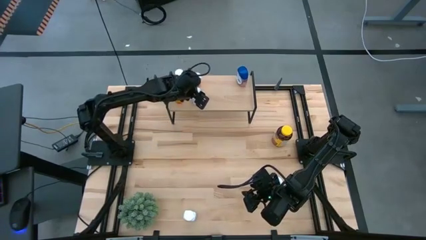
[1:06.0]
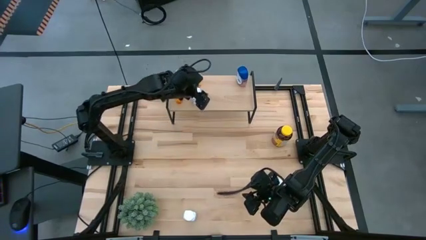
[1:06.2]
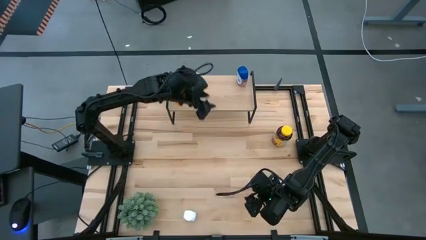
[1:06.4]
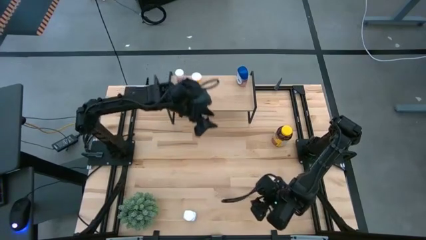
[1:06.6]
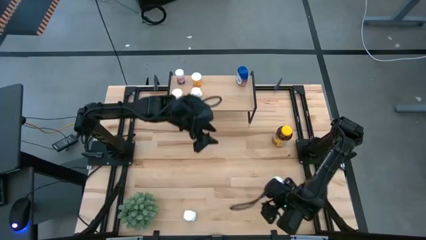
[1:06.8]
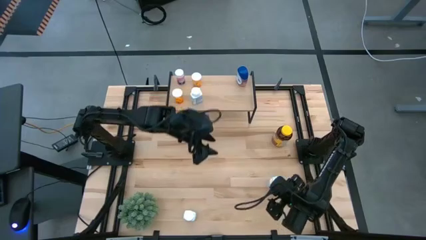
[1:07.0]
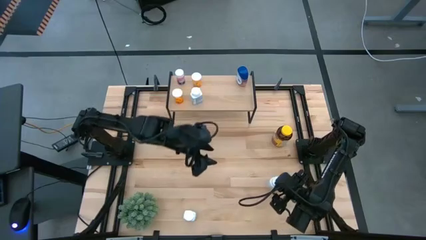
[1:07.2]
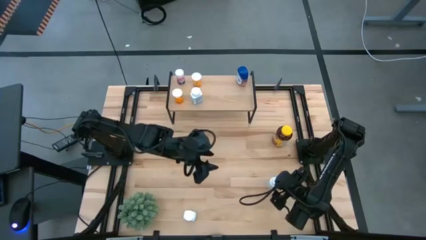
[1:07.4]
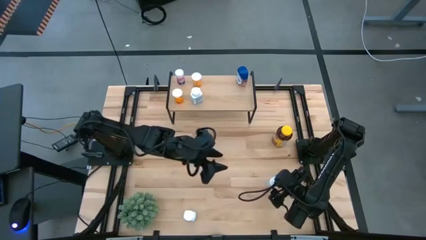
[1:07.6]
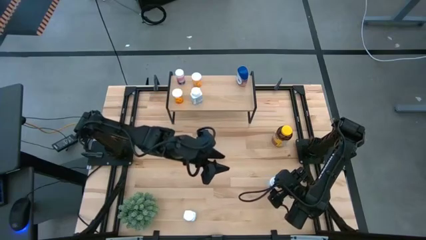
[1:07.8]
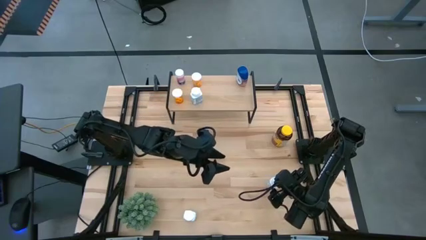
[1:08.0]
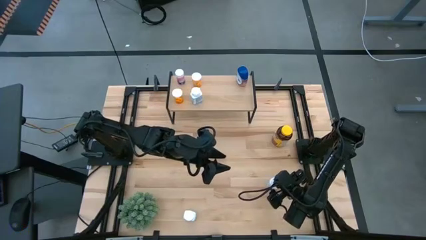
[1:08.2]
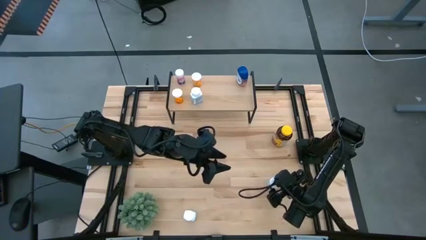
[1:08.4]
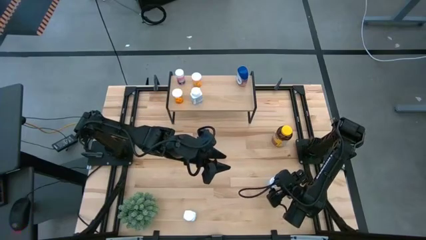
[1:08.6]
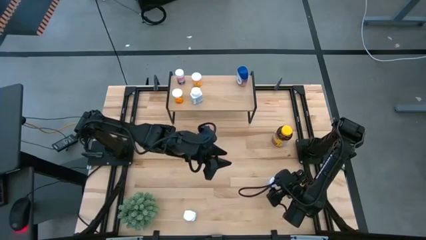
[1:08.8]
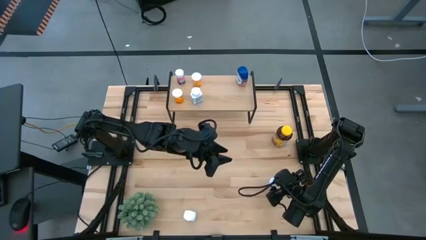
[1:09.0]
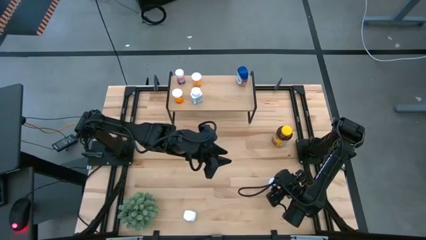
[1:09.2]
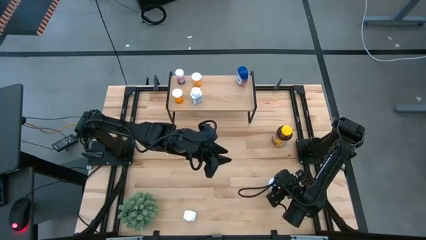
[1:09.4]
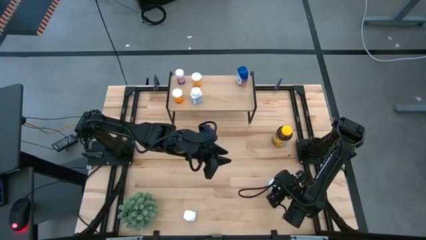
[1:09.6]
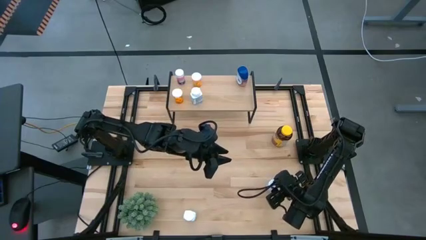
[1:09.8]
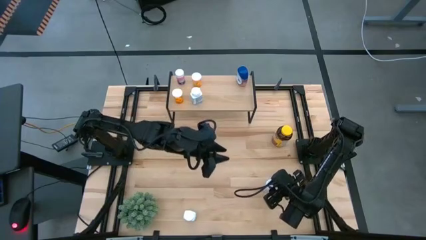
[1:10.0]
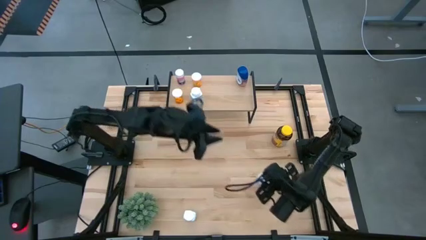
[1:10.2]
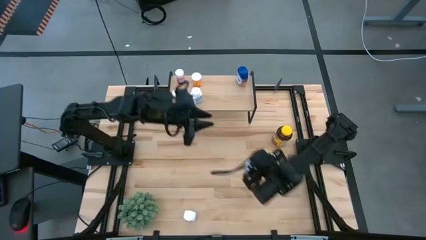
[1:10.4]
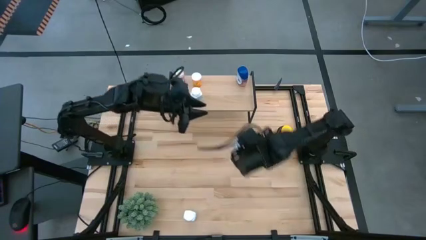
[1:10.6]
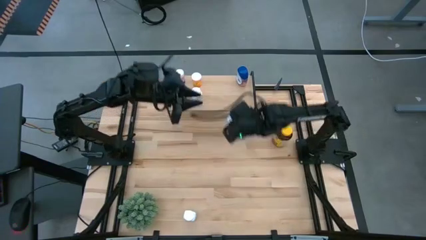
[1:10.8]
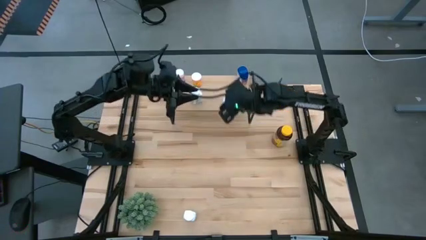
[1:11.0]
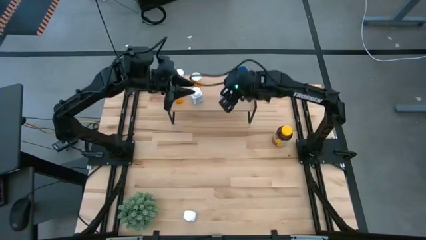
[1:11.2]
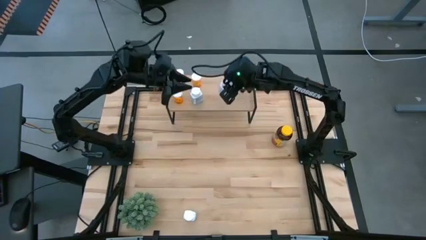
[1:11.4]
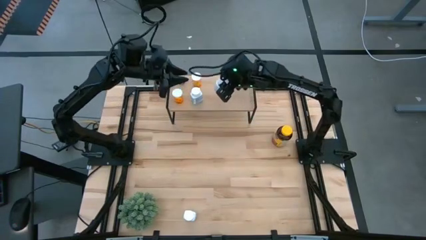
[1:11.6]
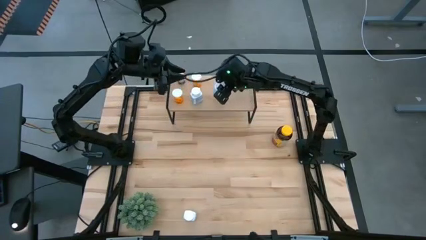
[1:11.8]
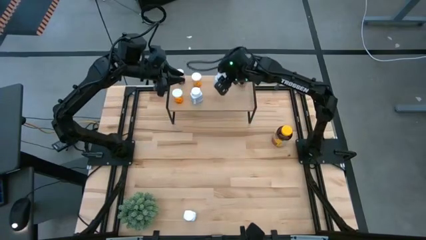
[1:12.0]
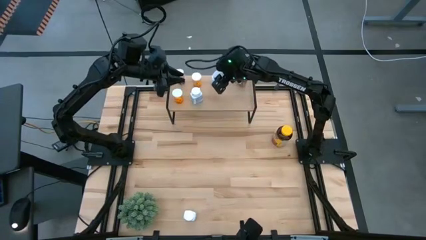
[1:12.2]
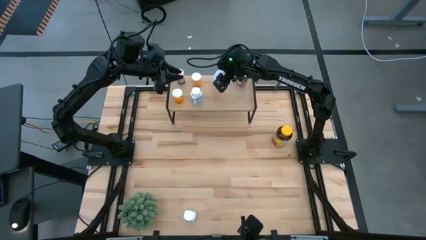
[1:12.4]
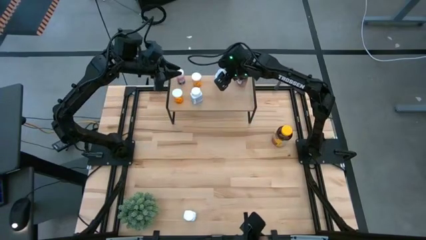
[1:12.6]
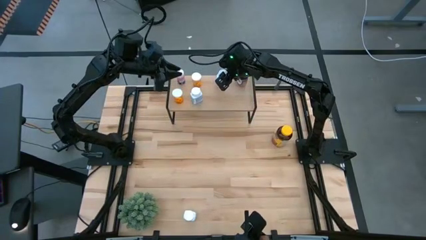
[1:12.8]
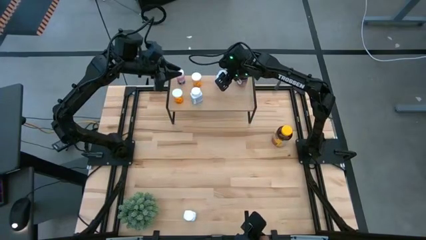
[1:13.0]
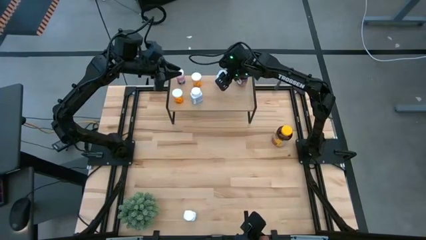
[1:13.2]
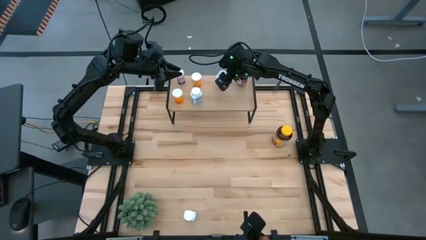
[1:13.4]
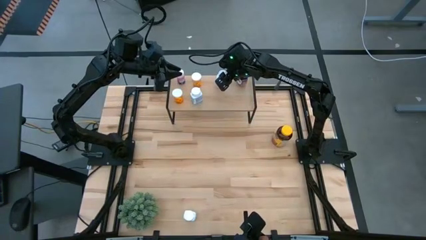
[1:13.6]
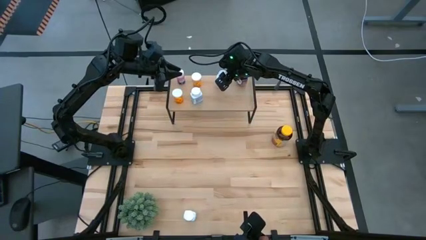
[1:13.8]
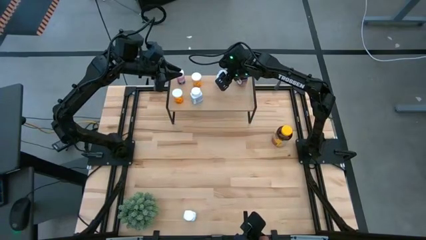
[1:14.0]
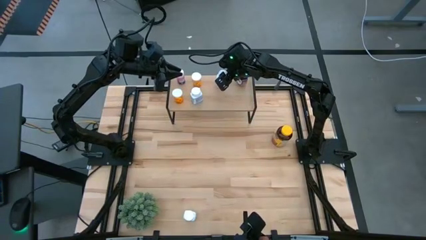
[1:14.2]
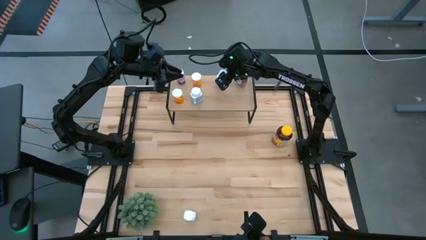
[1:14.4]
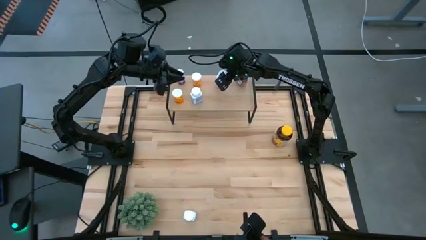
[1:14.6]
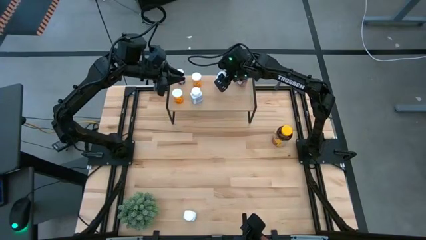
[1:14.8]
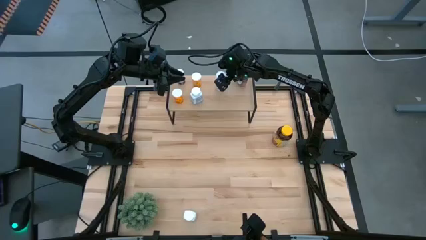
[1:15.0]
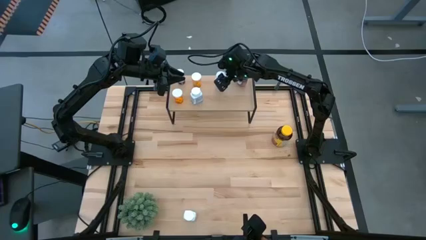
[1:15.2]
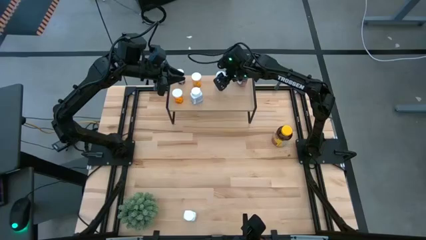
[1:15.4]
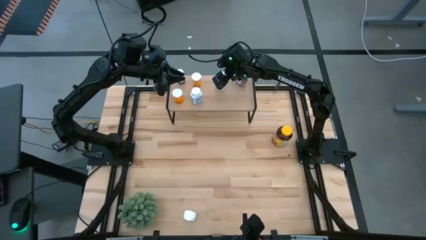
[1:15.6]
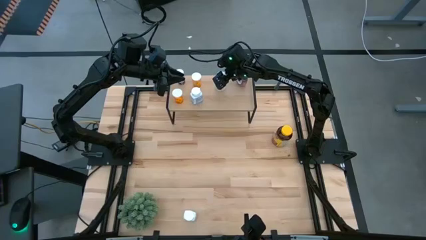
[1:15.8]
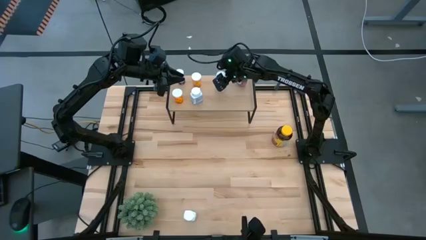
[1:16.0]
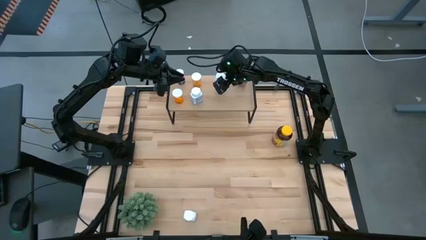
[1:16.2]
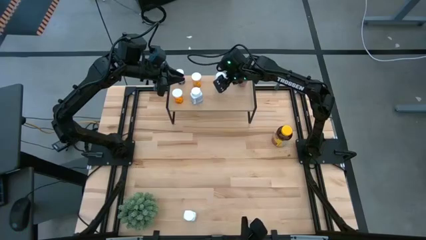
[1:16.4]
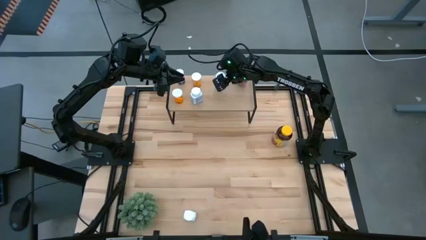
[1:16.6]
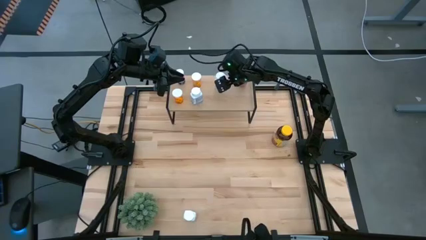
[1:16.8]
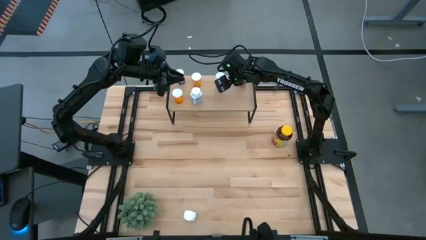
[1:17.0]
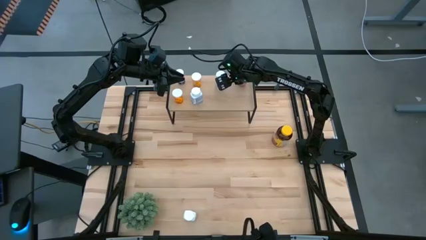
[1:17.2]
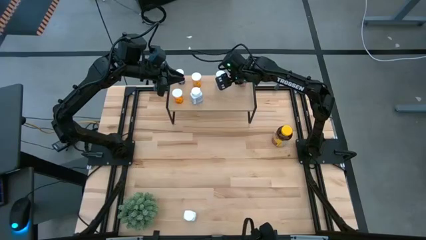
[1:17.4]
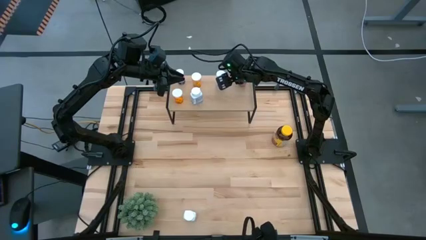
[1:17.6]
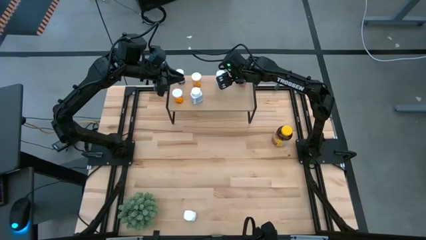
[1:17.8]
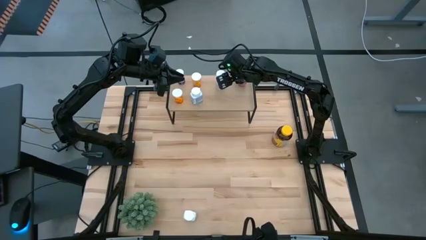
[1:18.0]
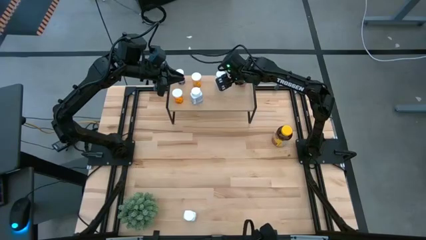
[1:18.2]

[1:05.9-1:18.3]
Task: Pick and place medicine bottles onto shelf by color
Put the top white medicine bottle on the shelf
